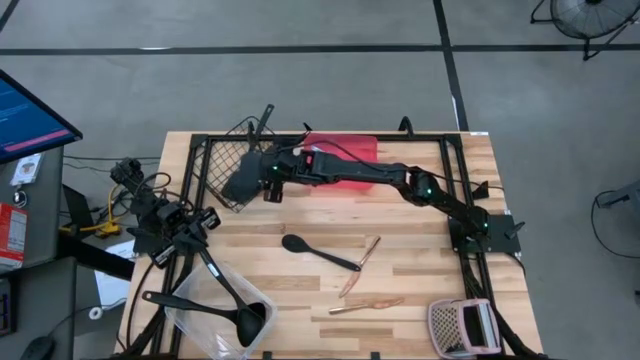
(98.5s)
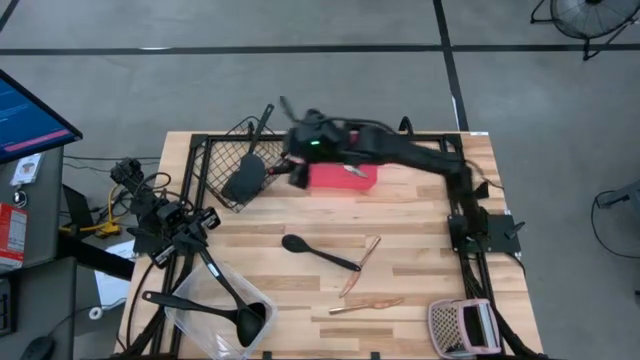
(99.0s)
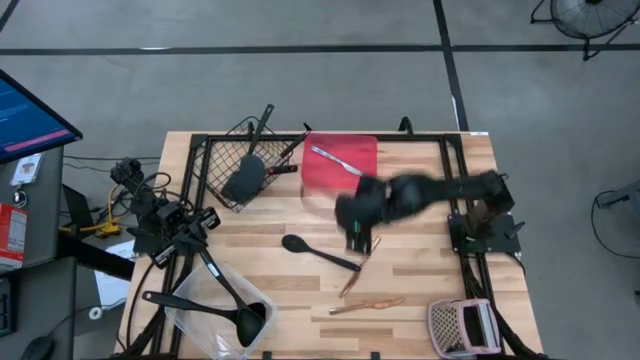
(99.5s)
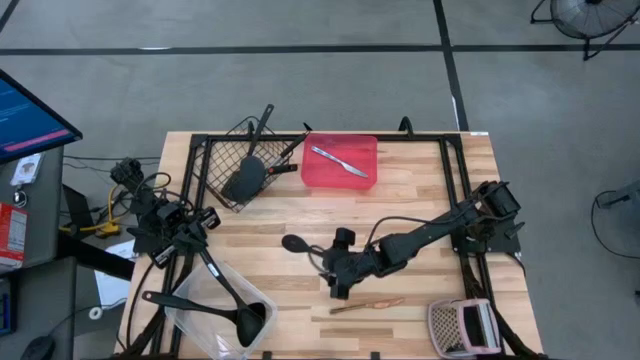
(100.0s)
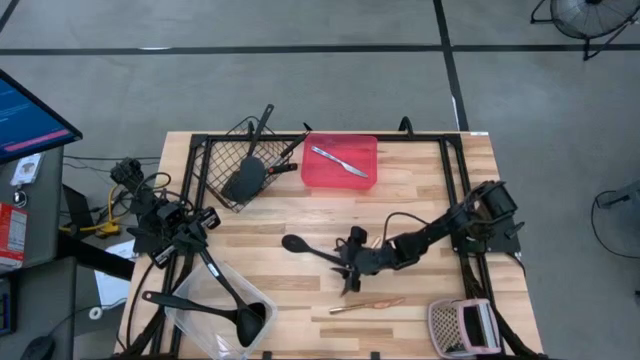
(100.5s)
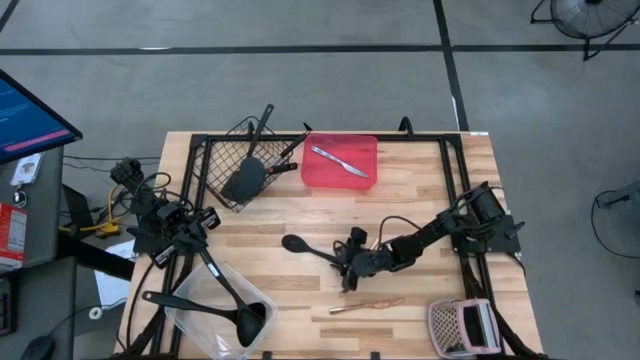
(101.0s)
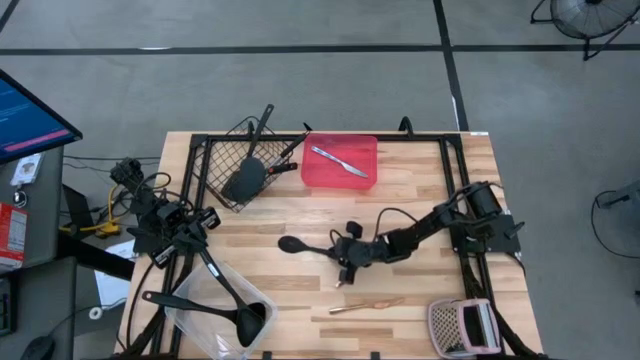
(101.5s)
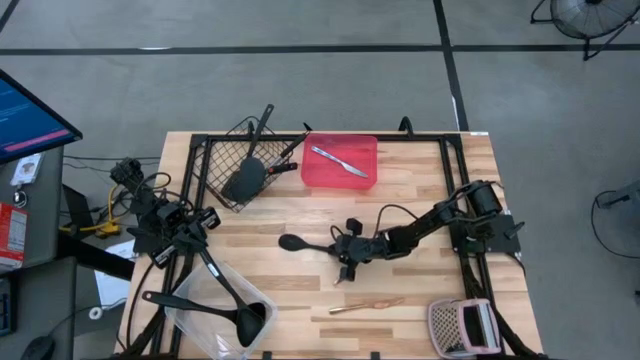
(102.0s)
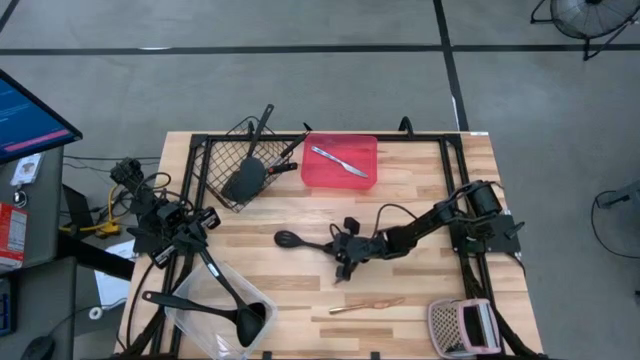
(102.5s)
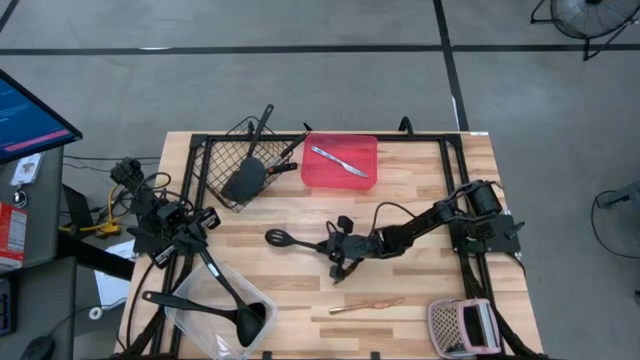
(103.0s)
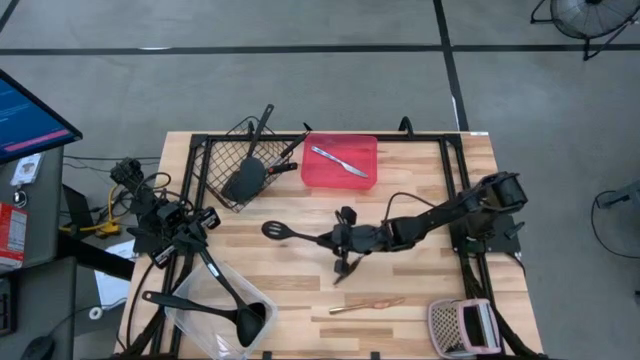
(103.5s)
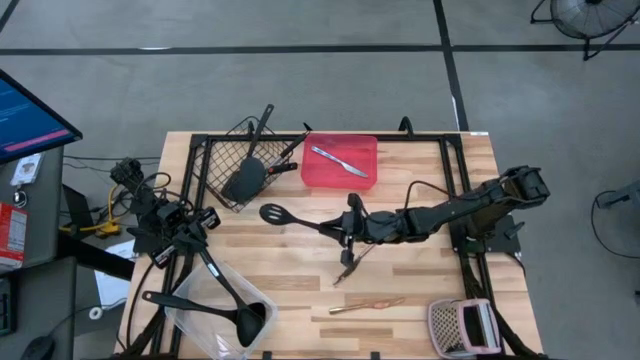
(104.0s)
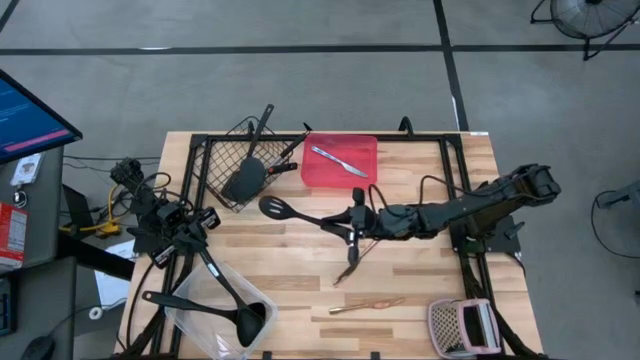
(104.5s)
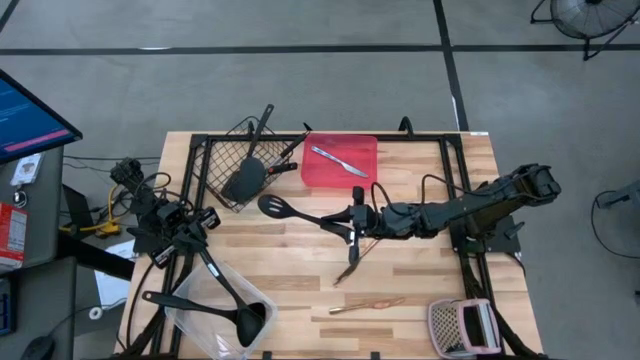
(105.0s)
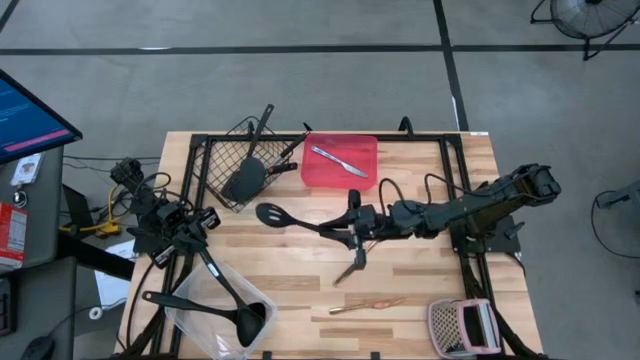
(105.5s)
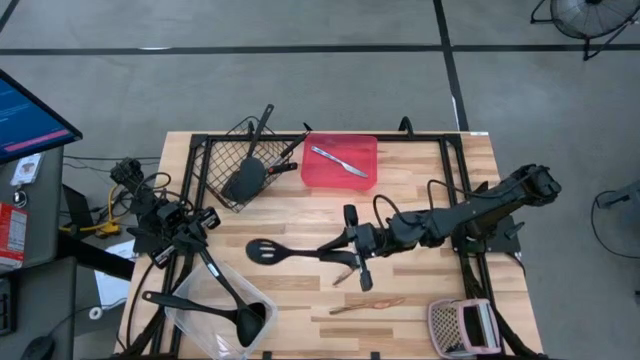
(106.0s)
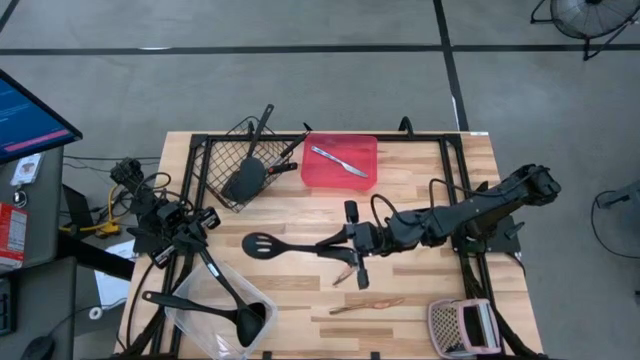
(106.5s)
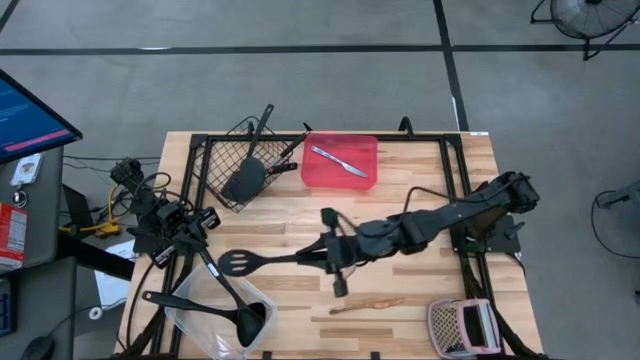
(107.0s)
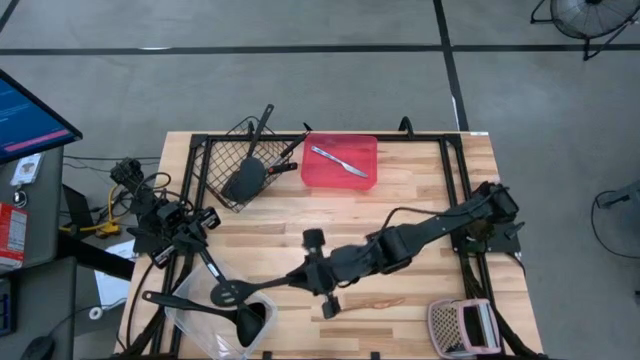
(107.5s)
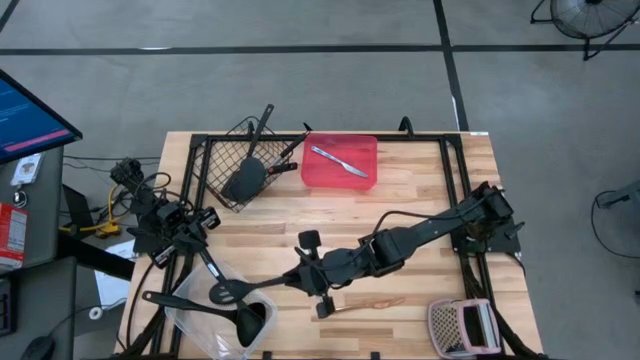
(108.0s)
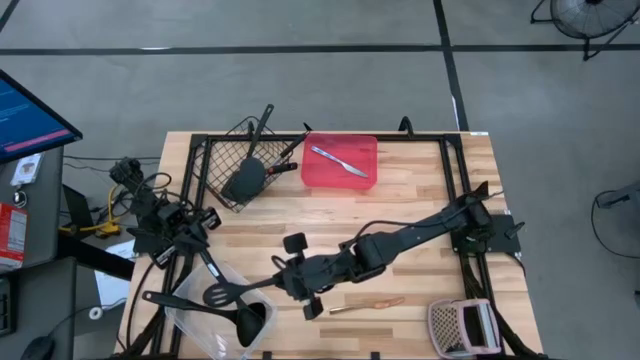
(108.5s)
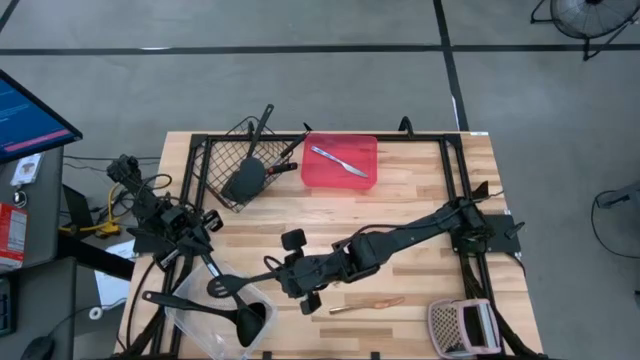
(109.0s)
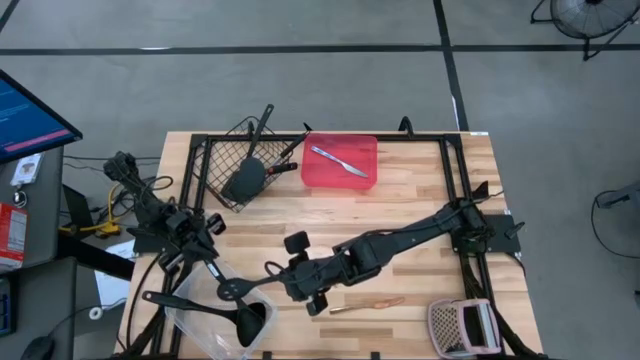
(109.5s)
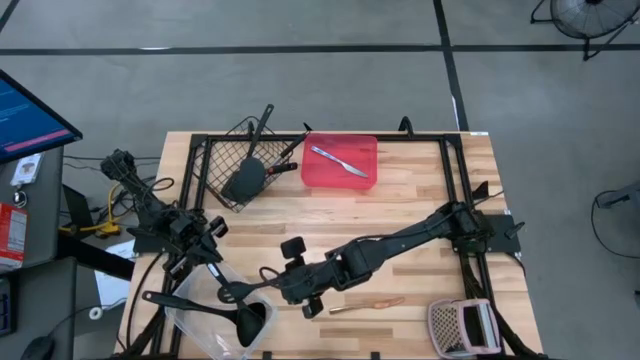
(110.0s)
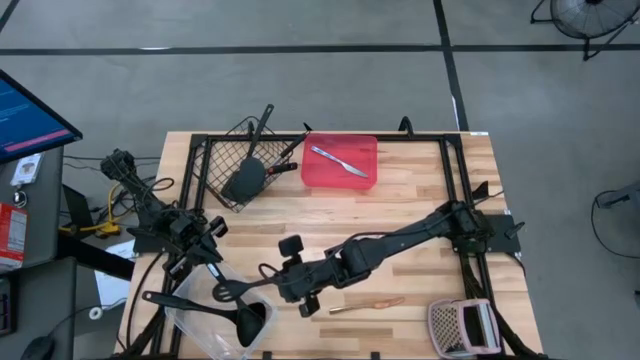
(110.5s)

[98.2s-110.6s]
Task: Pick & Place Kitchen Items
Put the slotted spatula into the white bin

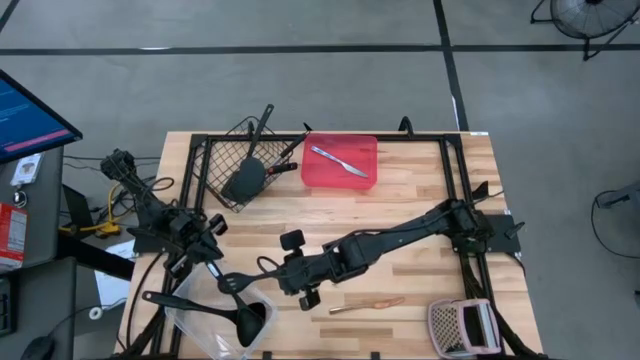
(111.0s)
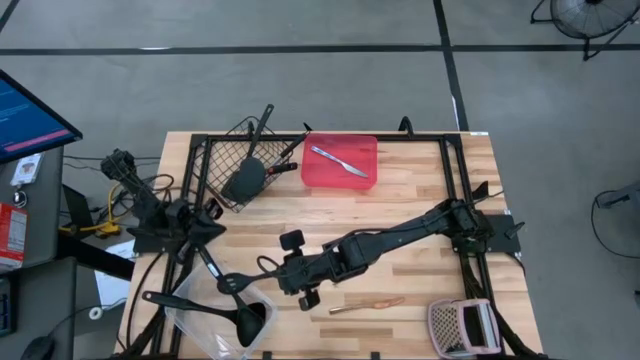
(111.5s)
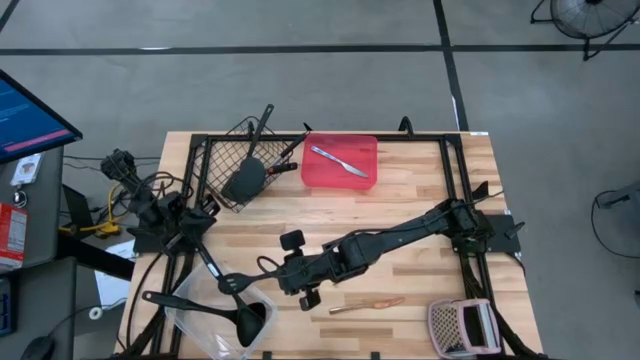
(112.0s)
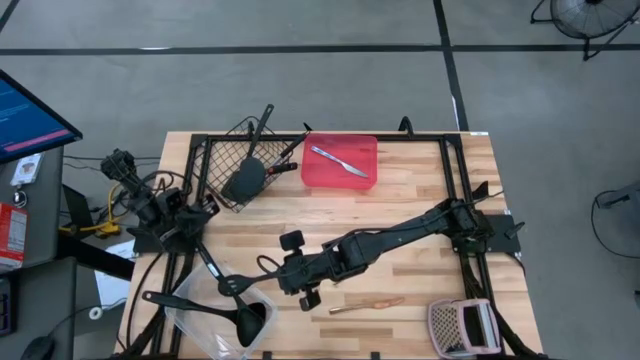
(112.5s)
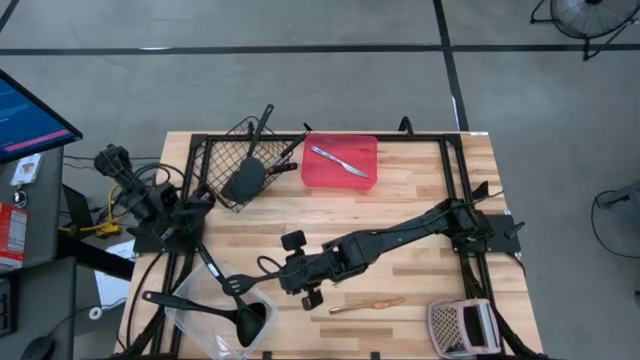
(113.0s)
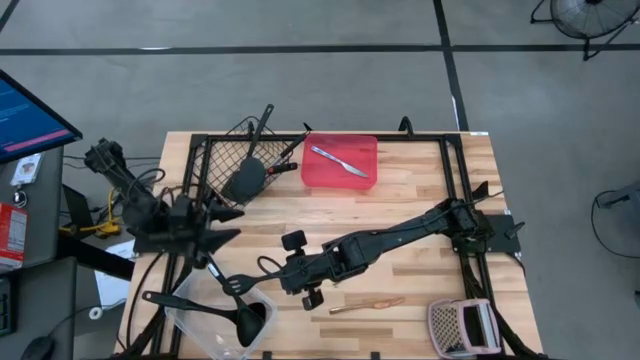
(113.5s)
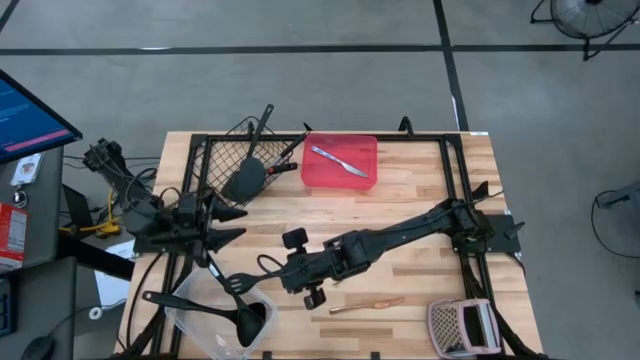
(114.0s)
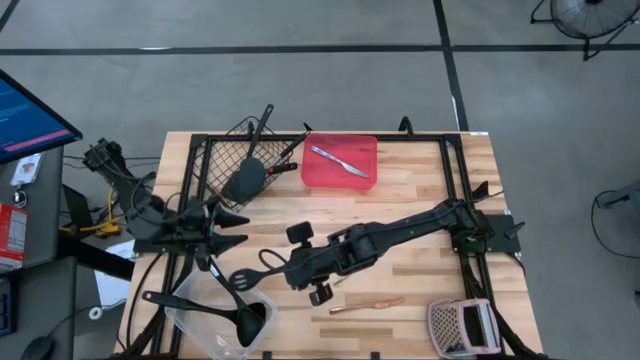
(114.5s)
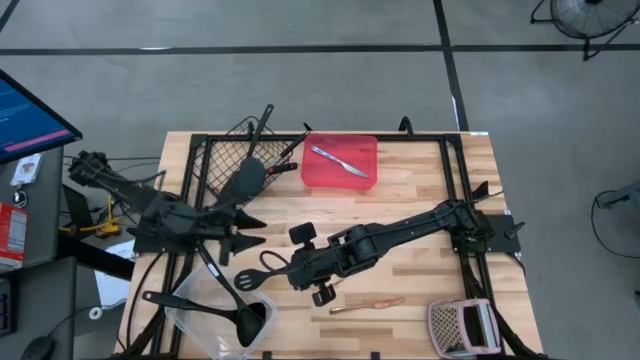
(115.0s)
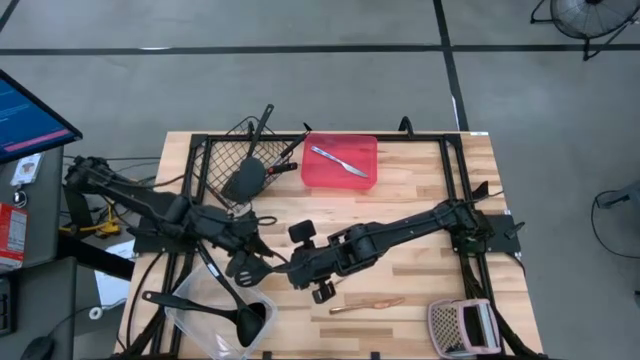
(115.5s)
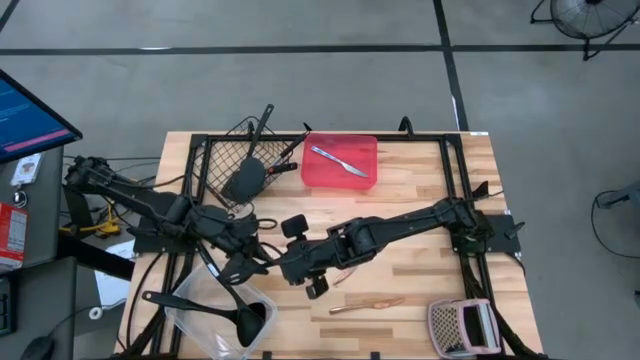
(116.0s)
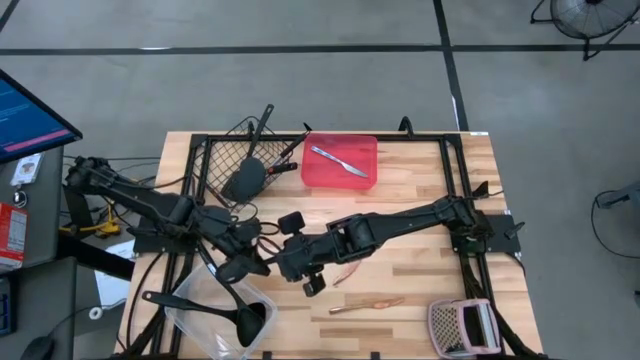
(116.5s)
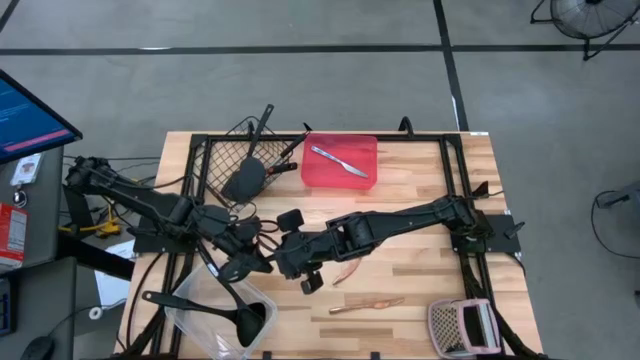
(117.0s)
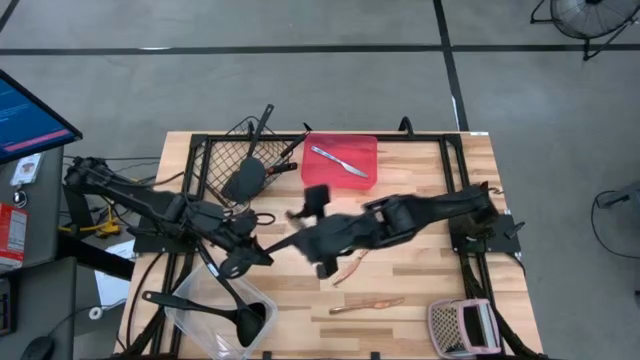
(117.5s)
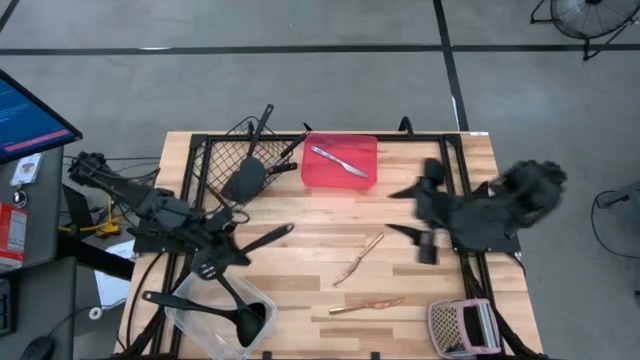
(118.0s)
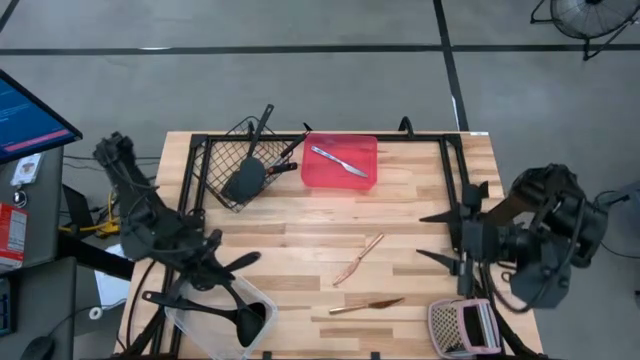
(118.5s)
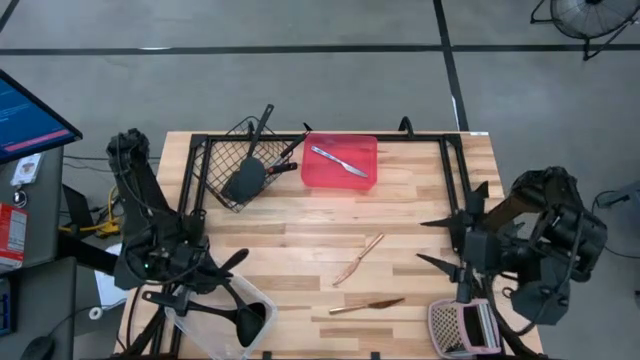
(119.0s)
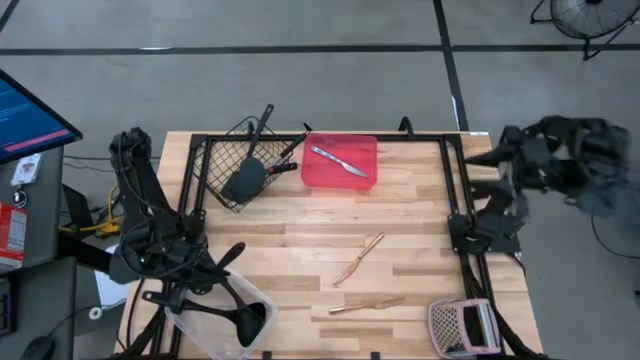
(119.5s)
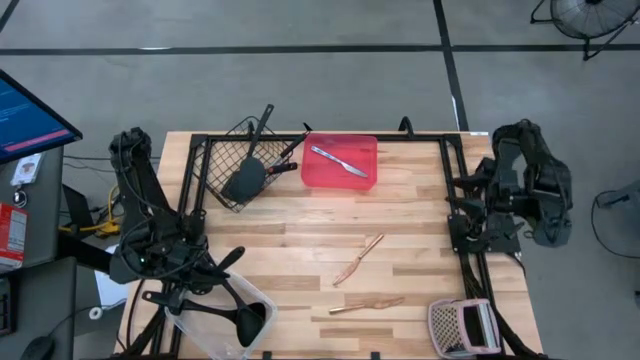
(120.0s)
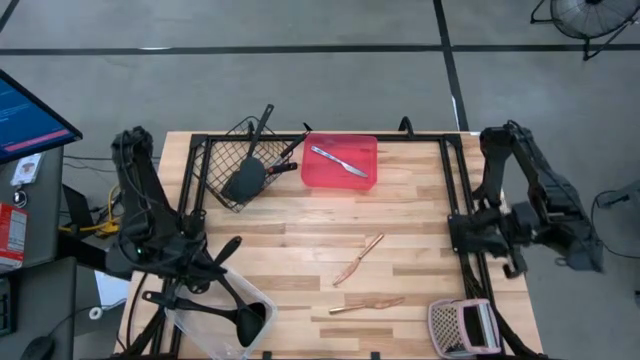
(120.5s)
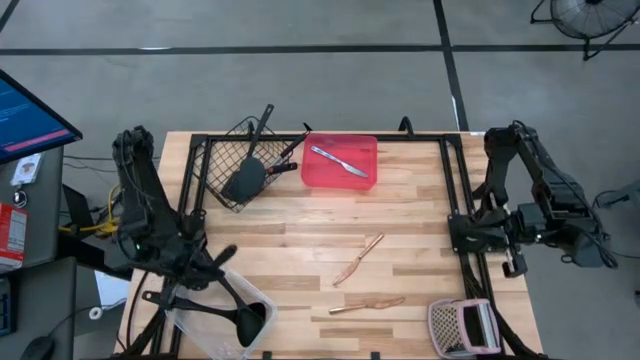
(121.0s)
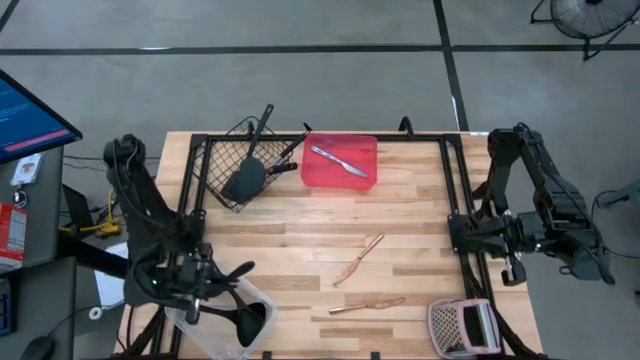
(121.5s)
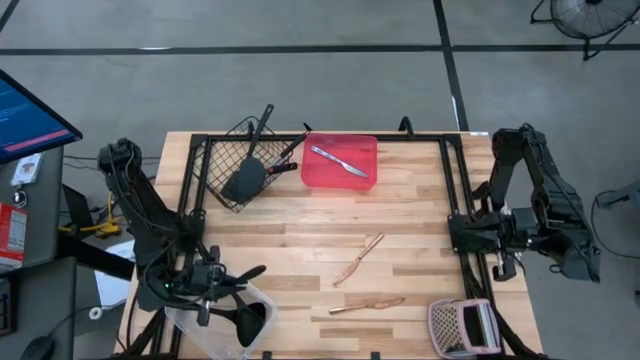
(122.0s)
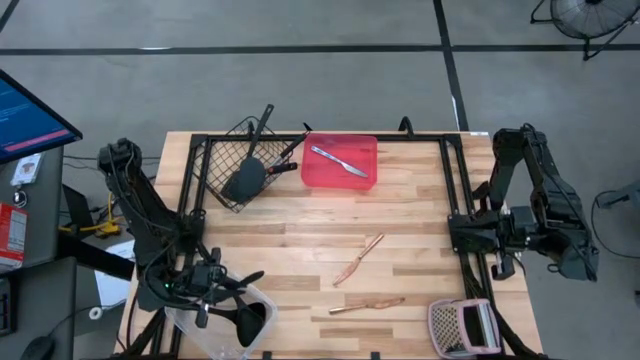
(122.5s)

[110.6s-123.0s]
Put the slotted spatula into the white bin
